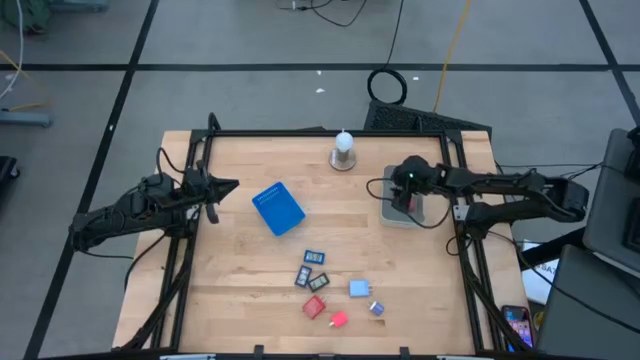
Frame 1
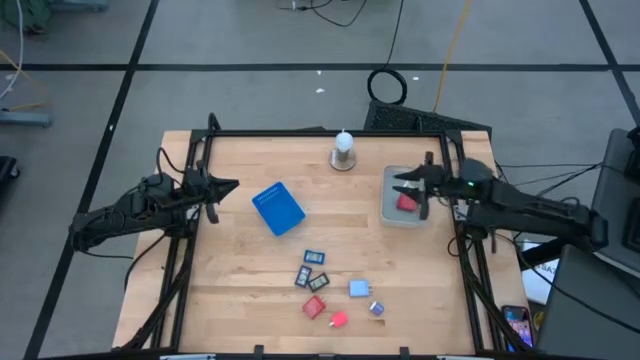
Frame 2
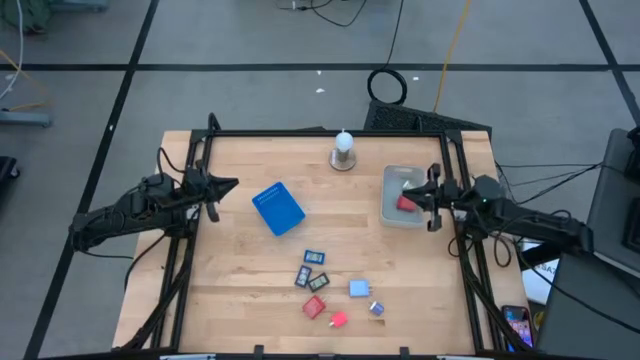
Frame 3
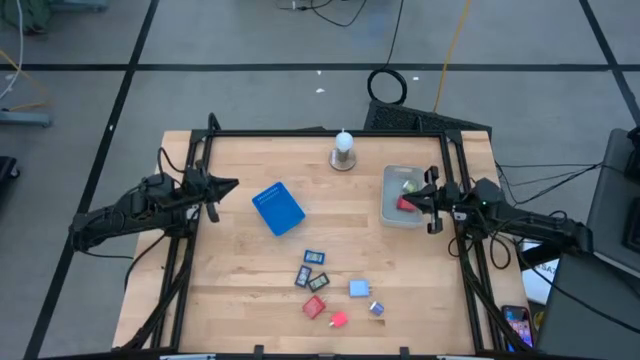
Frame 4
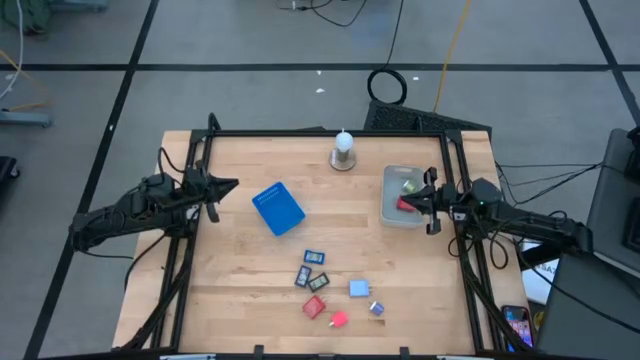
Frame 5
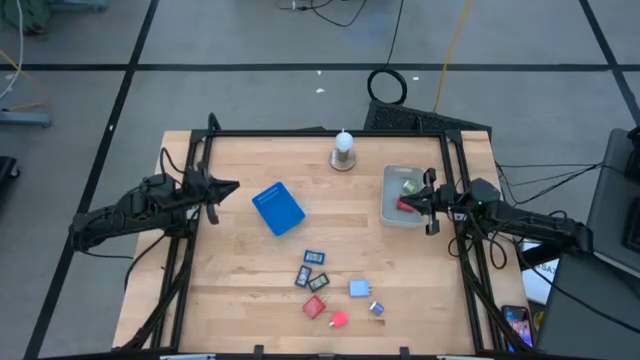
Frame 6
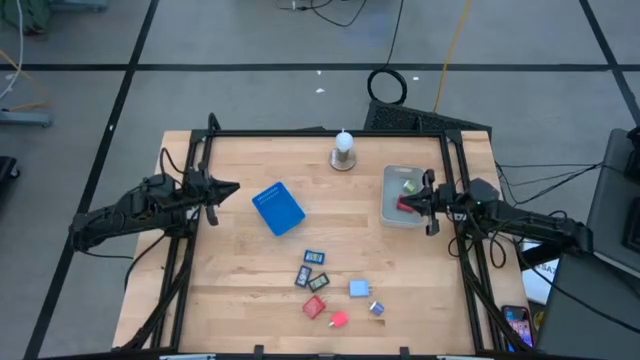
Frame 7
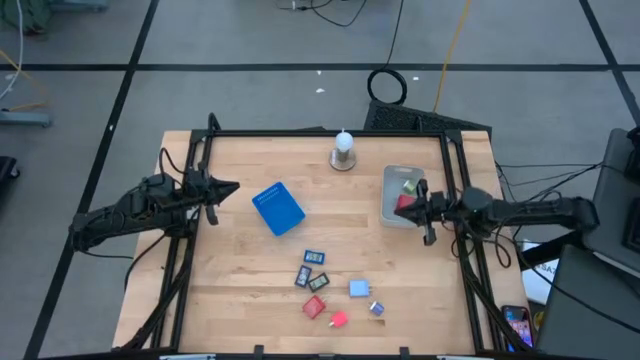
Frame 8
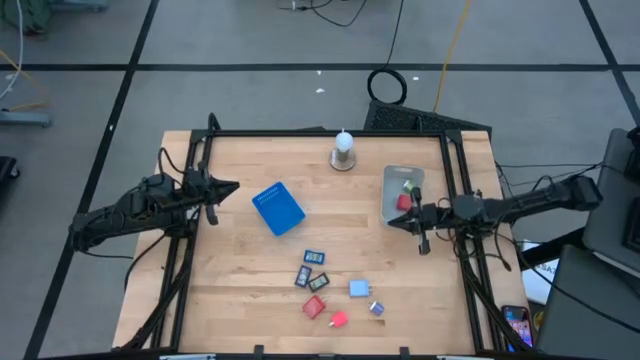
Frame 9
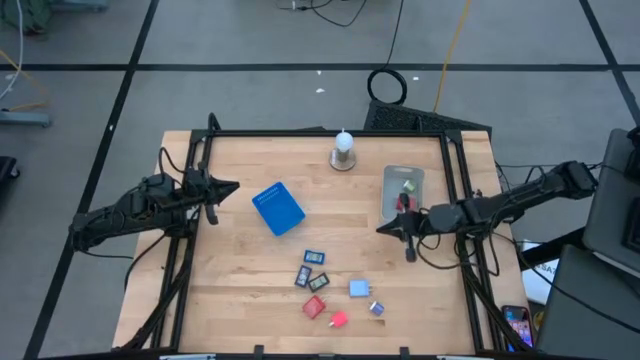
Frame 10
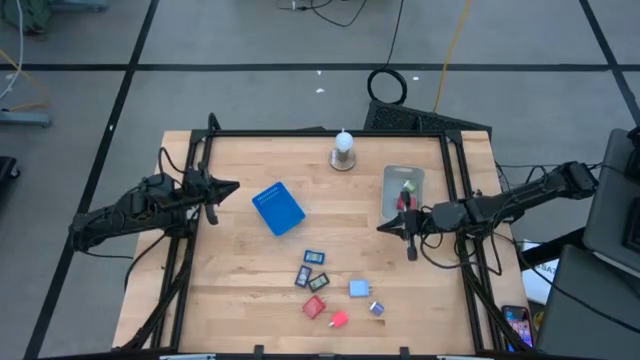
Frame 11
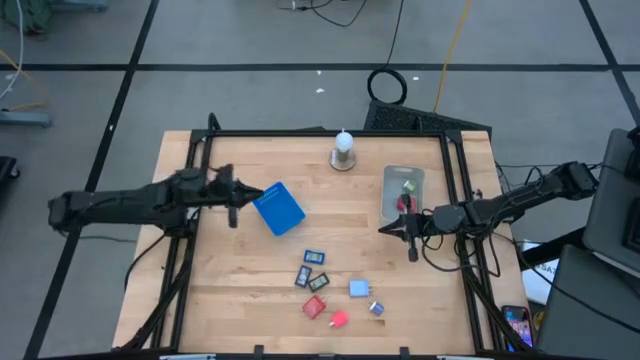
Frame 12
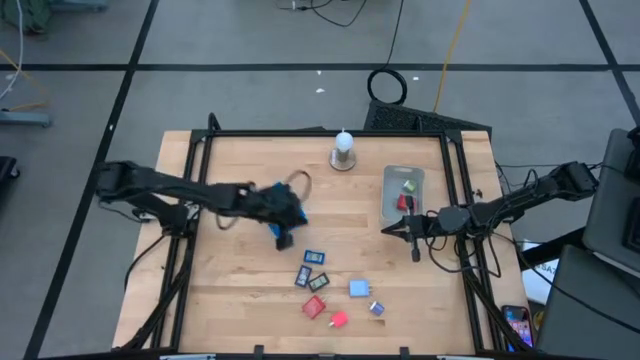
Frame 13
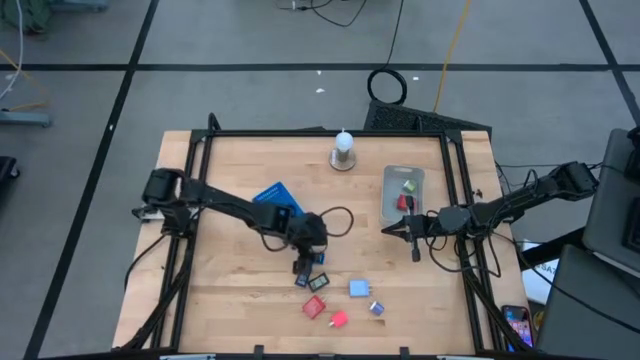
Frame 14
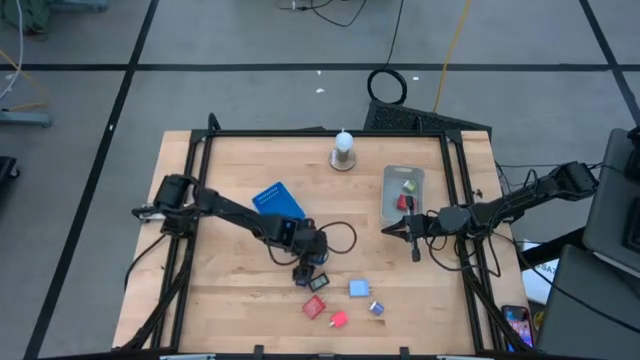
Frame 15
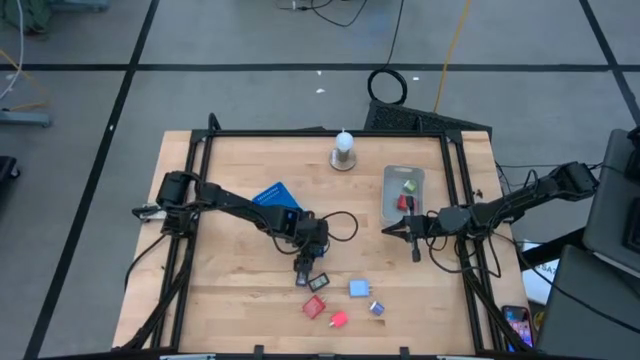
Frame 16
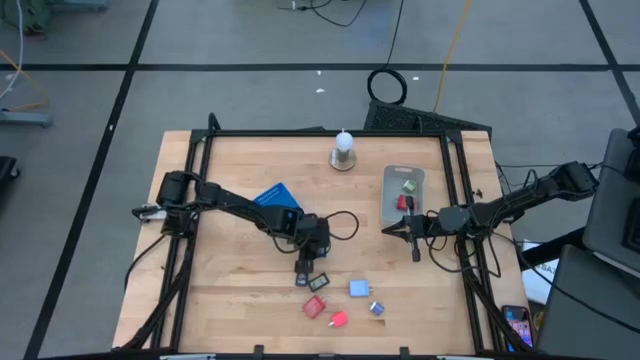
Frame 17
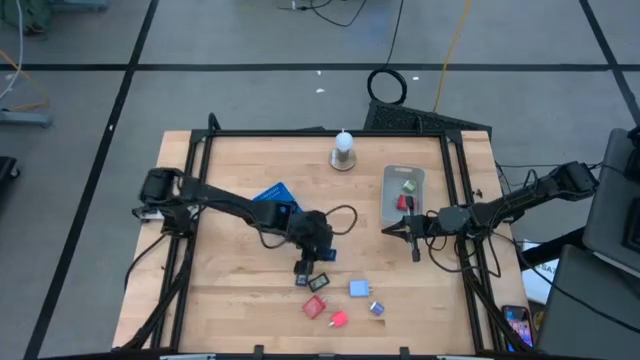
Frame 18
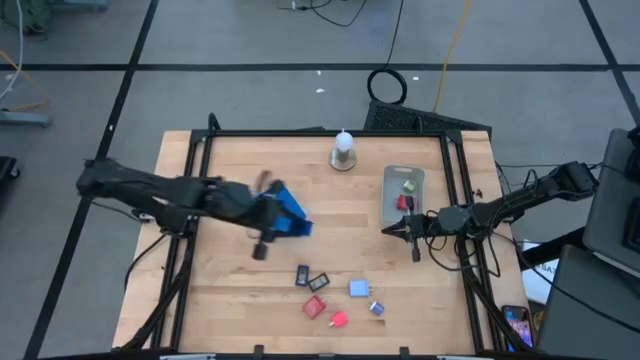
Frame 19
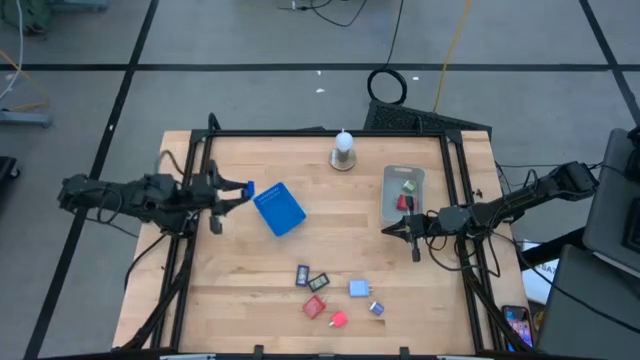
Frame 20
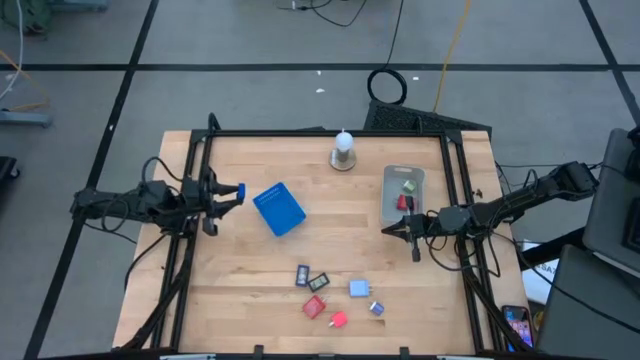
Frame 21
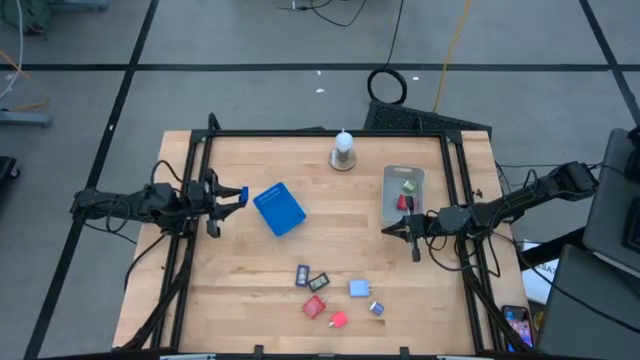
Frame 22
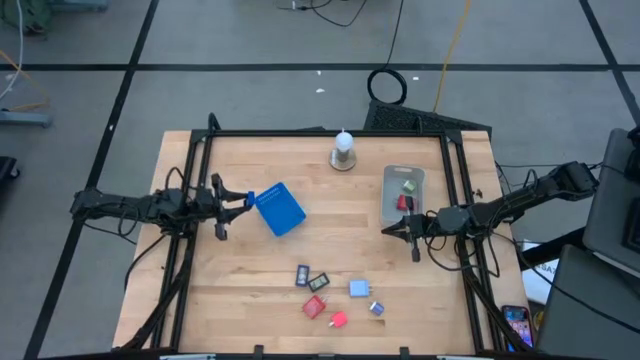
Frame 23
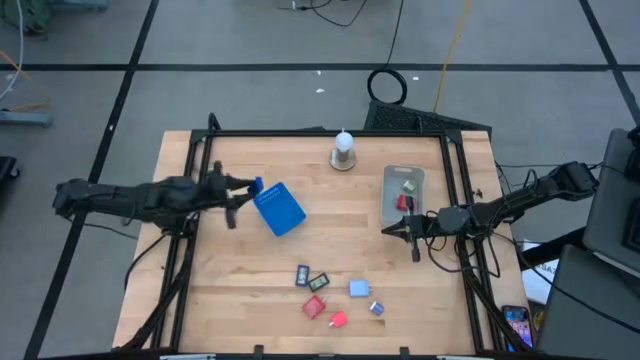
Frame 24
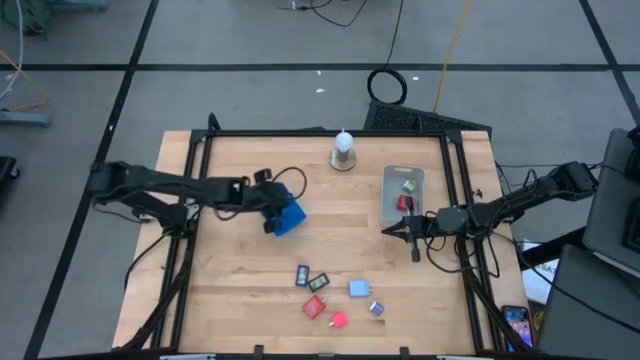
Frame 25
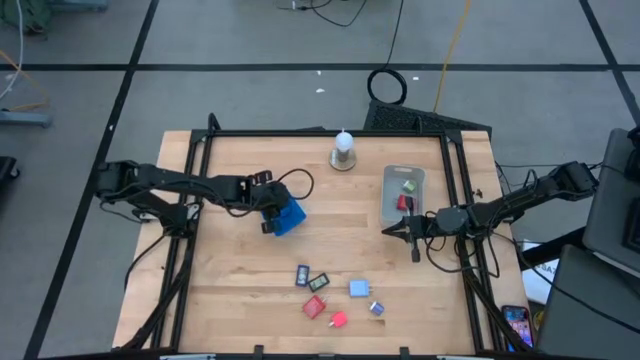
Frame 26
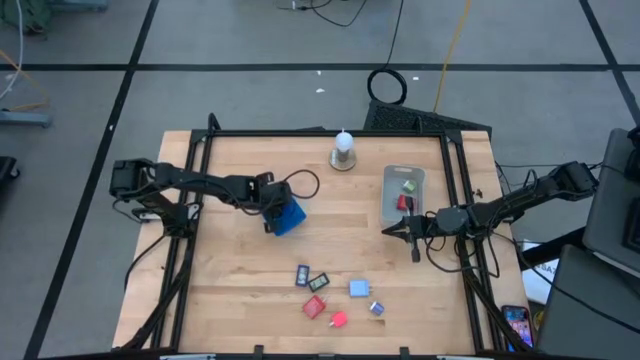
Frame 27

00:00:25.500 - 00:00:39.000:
Task: Pick & Place Office items
Put the top blue digital clock into the blue bin

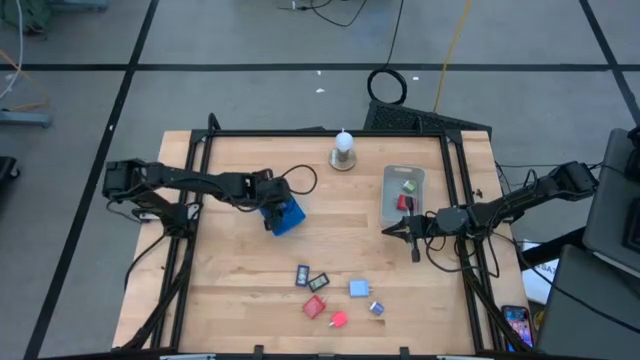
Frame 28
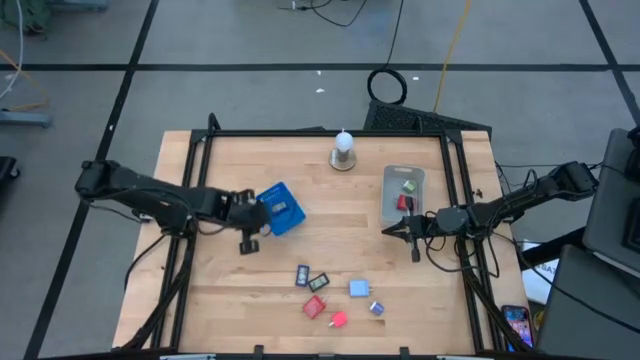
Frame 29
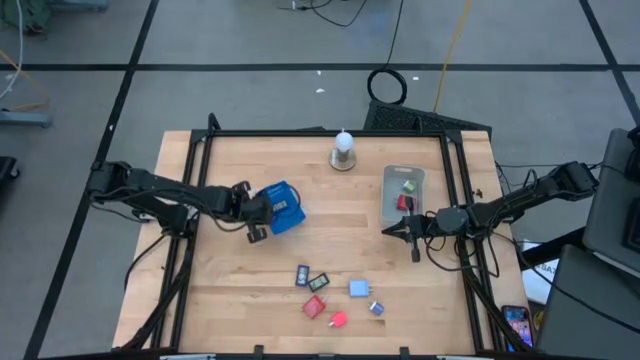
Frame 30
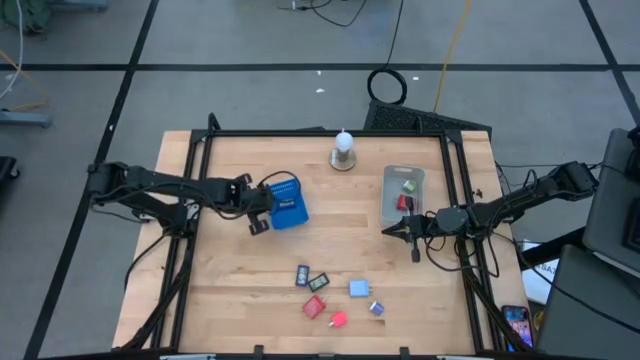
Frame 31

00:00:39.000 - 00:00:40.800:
Adjust the blue bin on the table

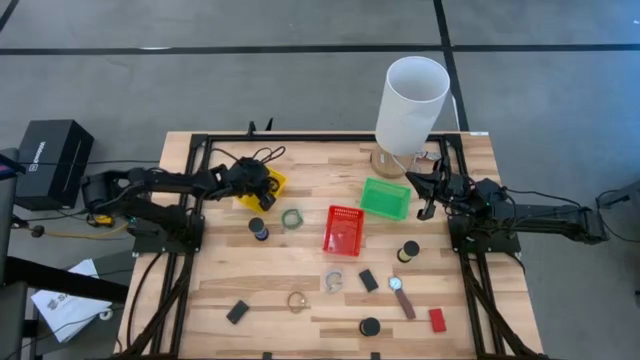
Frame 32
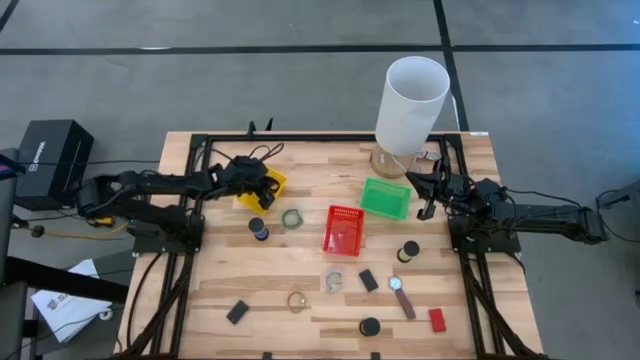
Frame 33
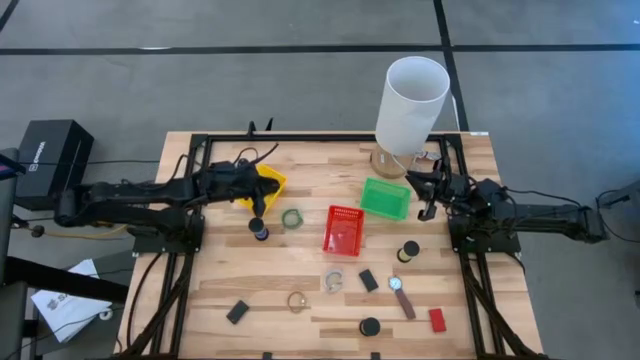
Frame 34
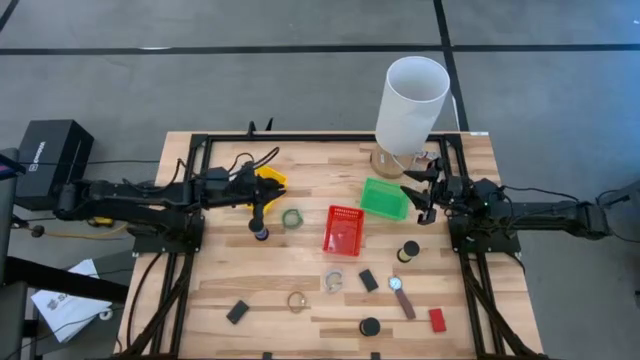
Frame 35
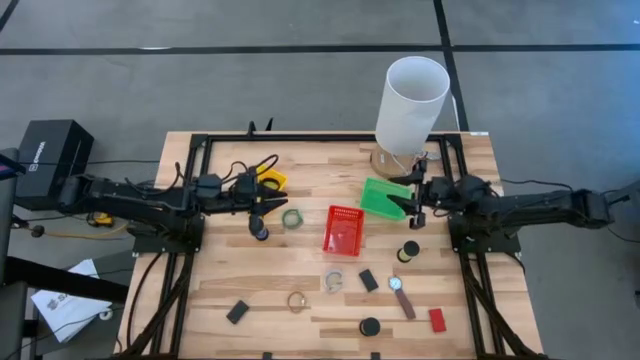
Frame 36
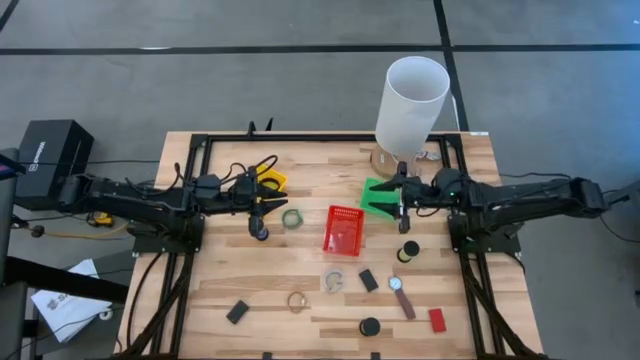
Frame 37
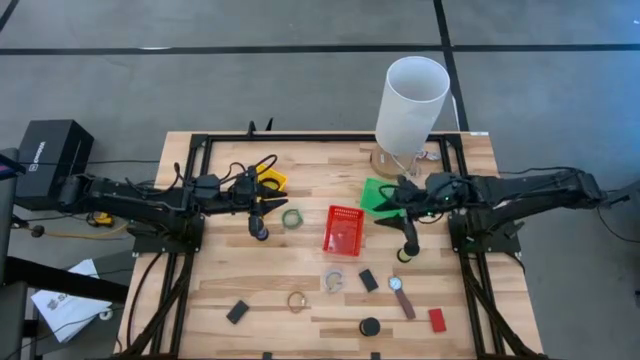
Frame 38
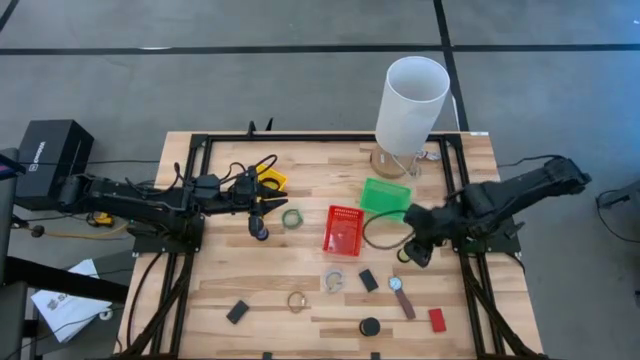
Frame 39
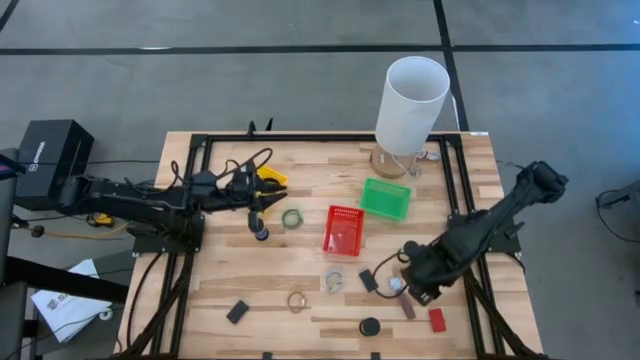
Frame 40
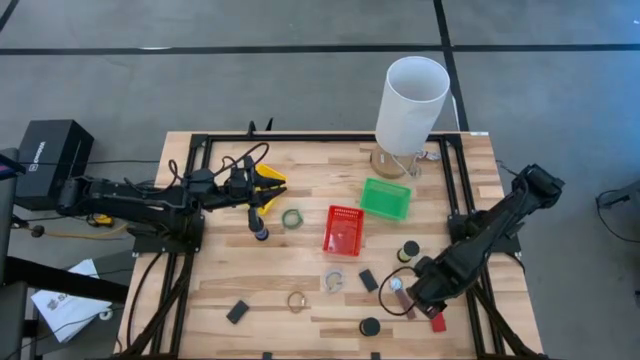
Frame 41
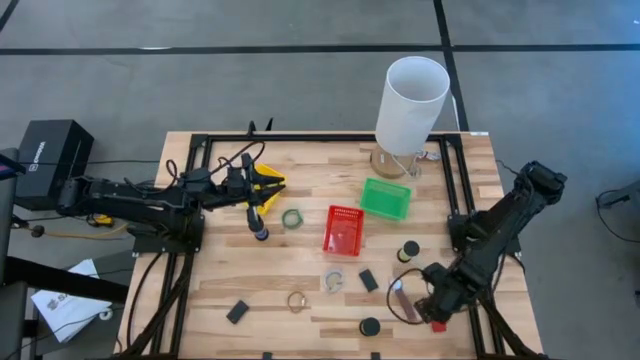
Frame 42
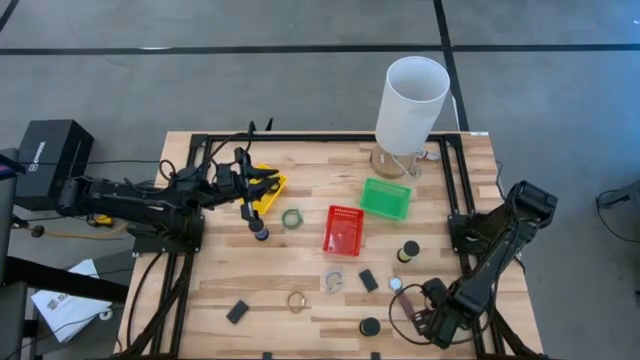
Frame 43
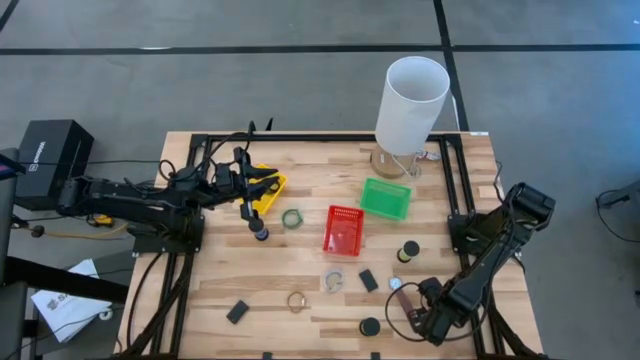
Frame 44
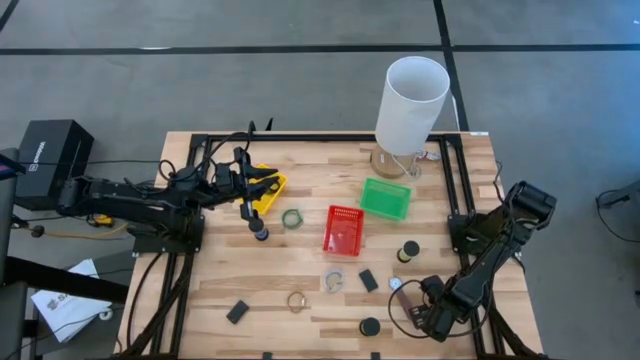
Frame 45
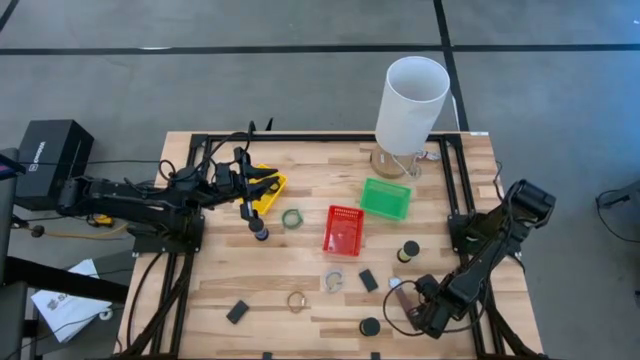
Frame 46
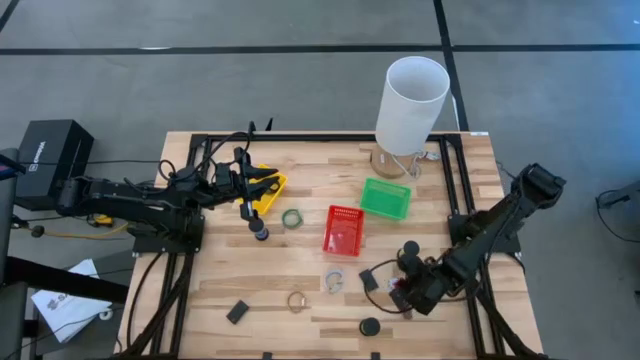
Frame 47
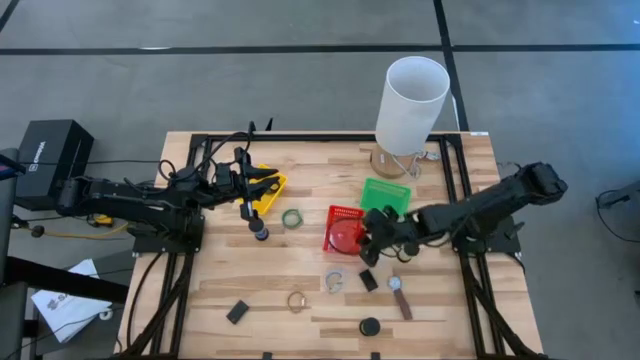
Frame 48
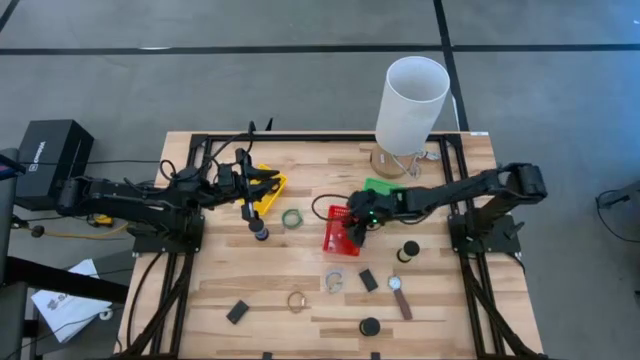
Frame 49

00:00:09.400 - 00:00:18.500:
Task: Pick & Place Office items
Put the red digital clock into the red bin
